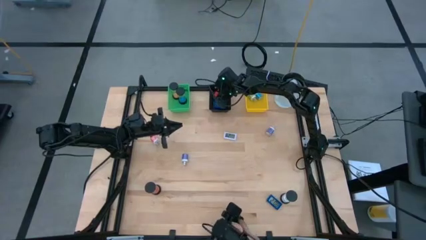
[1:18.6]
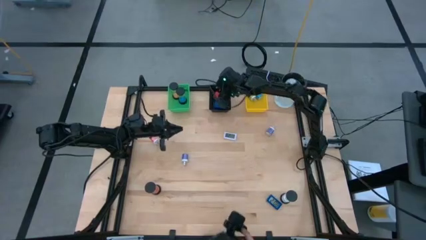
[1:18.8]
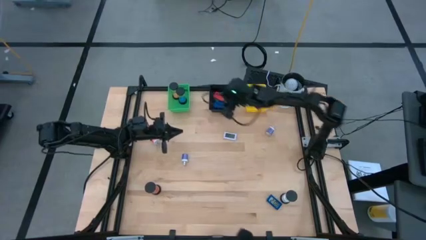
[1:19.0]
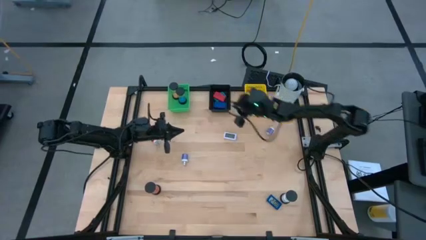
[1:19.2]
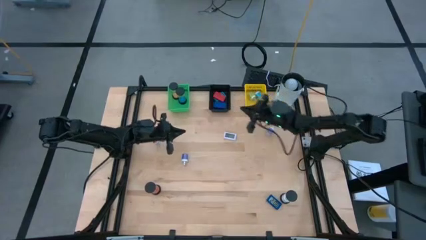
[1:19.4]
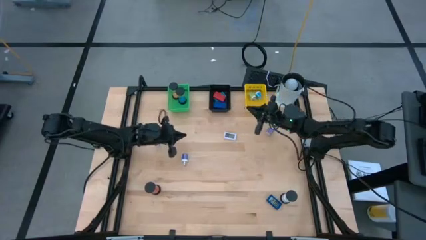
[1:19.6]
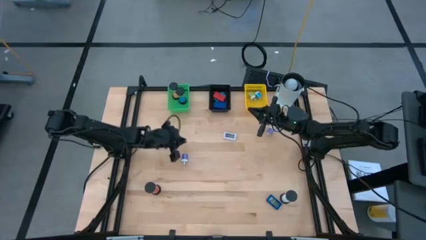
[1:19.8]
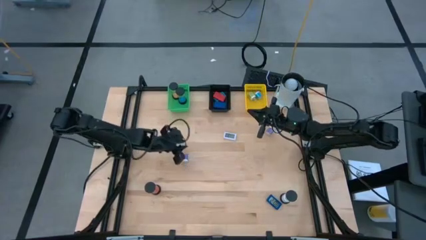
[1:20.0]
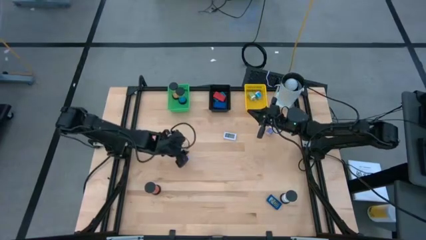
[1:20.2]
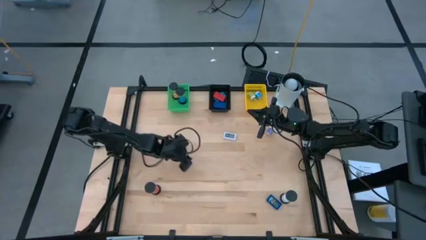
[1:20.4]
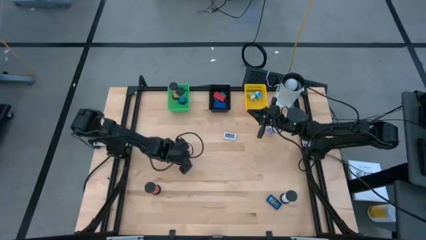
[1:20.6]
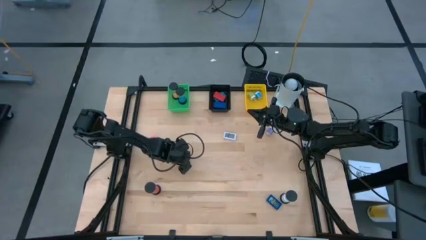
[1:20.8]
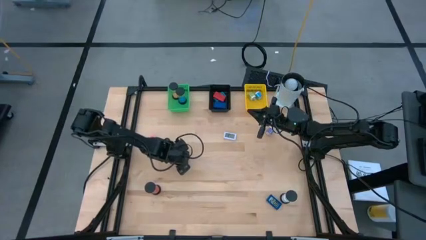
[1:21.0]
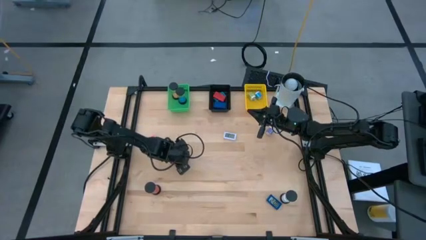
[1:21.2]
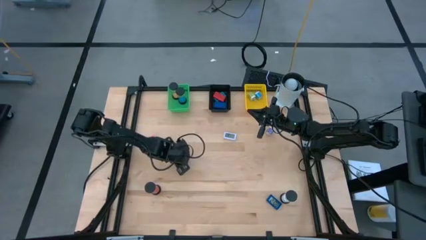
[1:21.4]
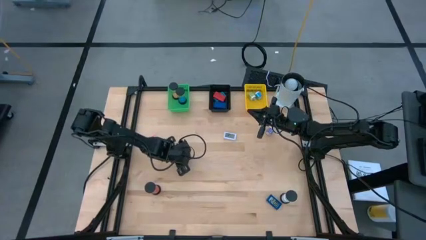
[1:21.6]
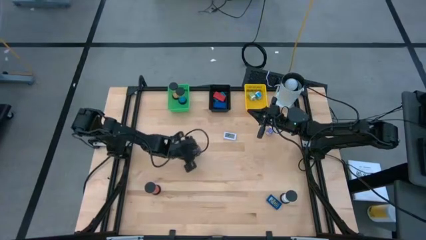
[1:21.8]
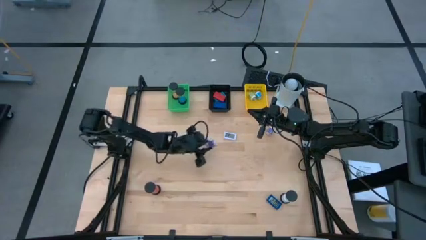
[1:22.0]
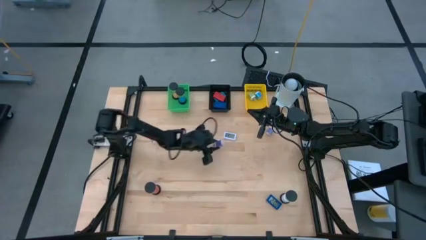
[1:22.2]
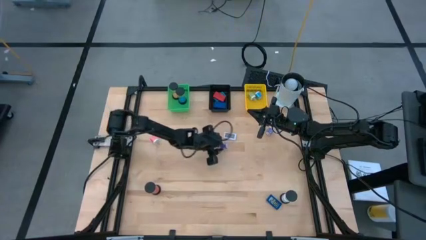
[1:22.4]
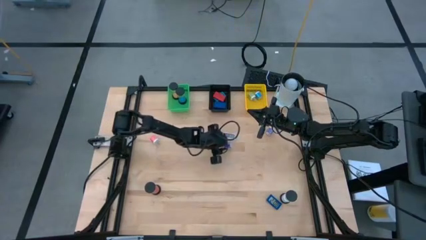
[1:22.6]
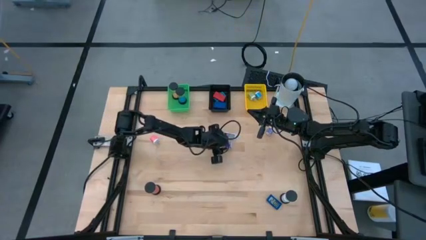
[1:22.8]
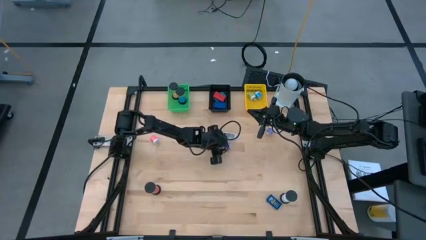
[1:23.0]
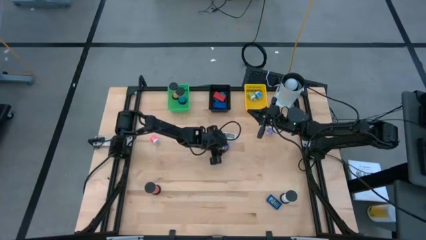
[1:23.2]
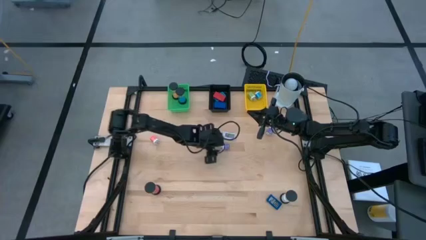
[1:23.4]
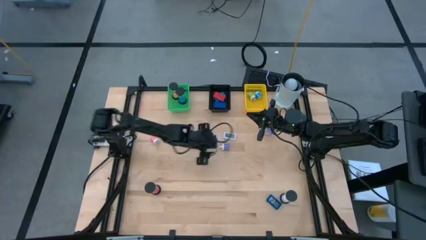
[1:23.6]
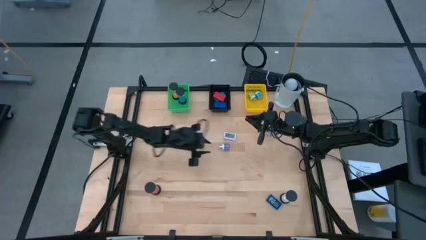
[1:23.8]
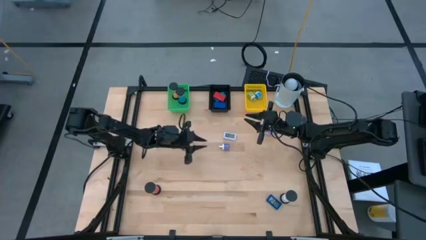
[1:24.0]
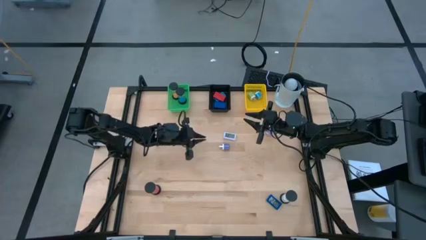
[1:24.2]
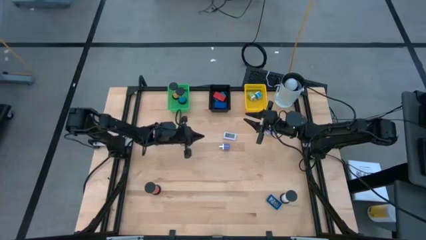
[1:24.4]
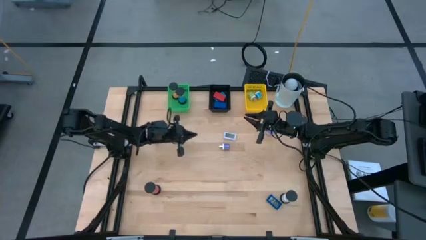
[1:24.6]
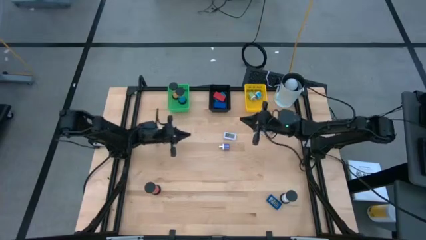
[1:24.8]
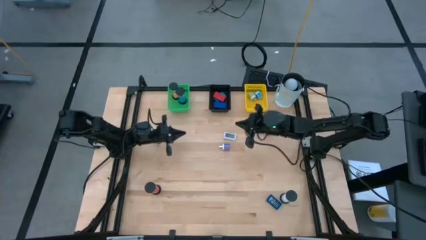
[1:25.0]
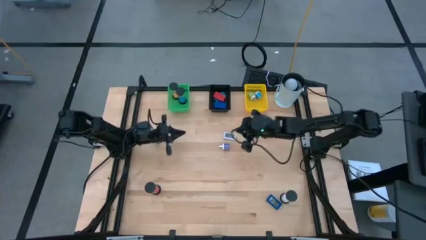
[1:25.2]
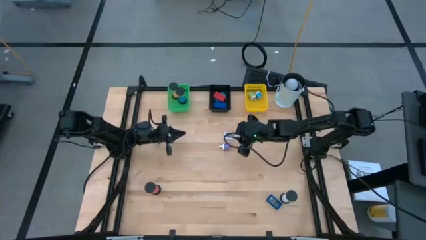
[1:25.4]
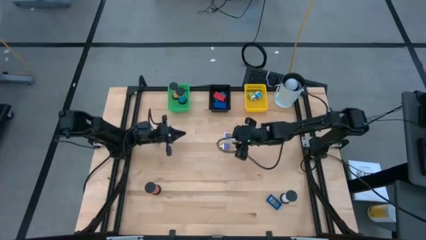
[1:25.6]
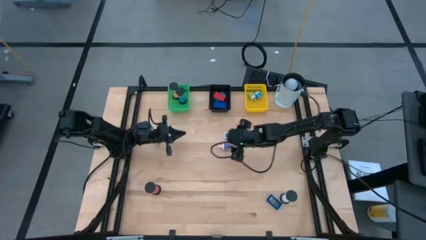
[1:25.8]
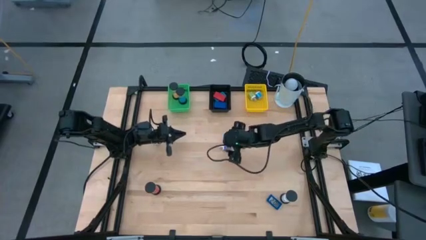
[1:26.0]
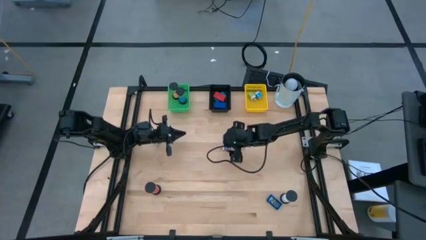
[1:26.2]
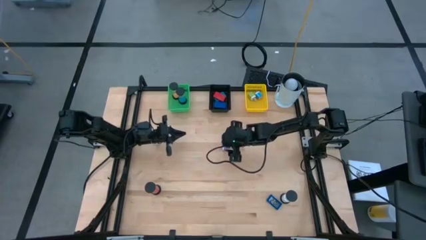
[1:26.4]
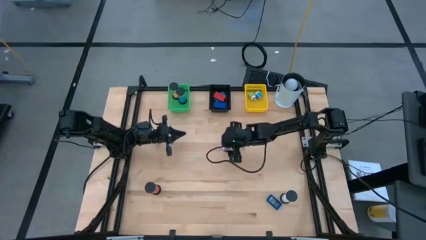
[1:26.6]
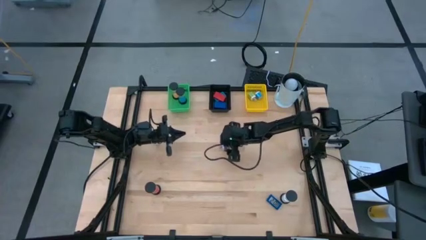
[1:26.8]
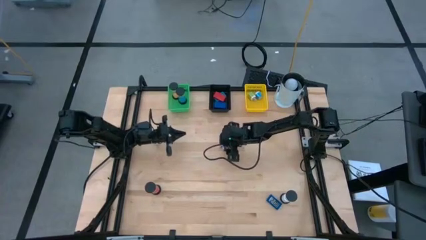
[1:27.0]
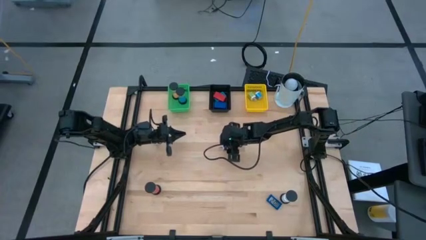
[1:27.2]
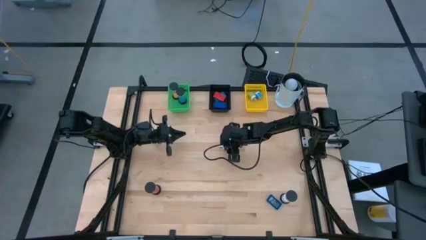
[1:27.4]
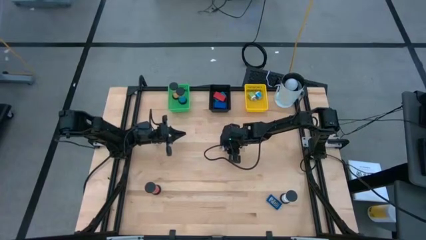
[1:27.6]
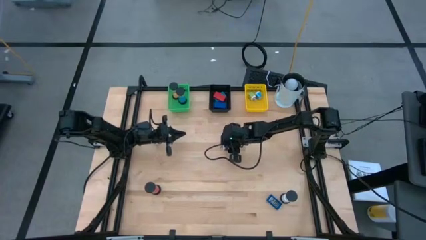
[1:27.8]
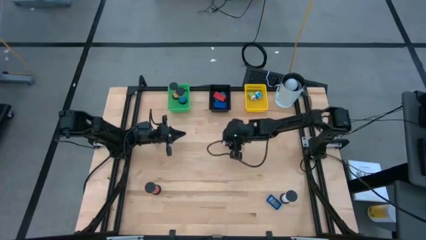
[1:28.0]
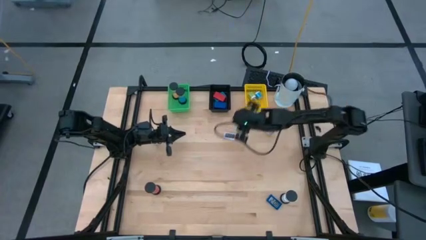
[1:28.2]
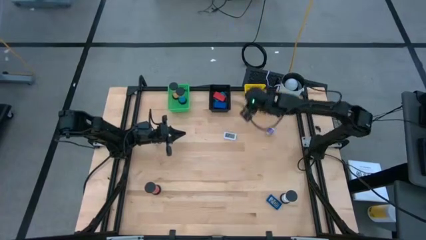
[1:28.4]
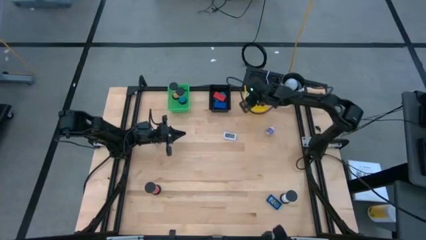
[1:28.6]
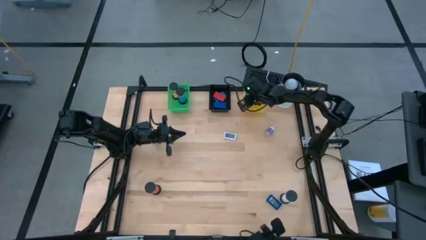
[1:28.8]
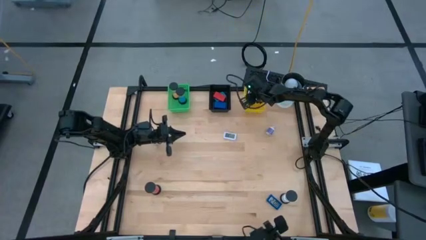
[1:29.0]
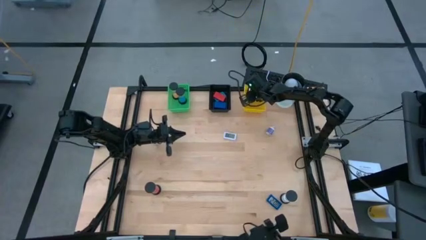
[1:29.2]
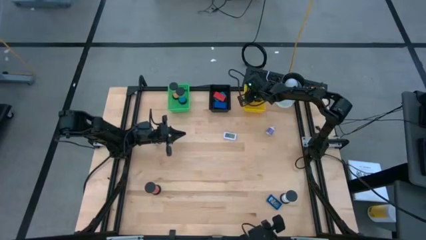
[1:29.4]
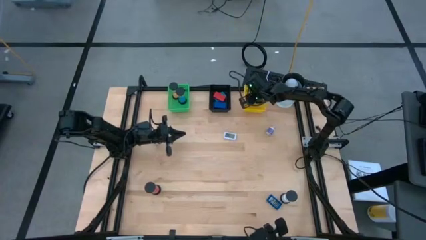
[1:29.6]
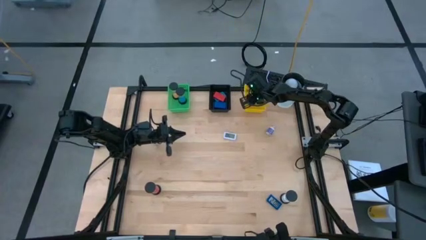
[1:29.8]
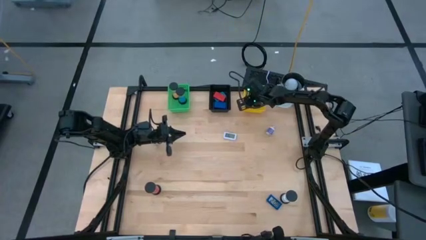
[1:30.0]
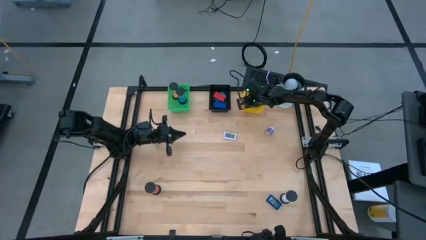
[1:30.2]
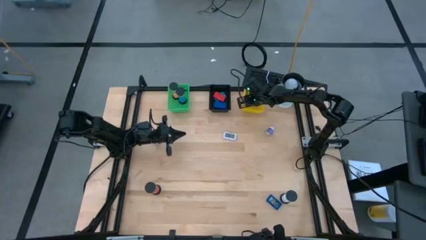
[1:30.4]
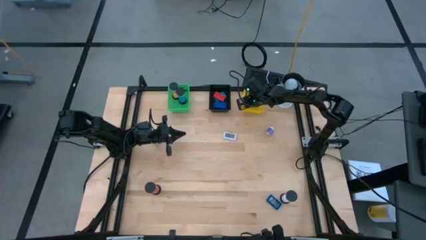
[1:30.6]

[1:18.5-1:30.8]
Task: Pick & Place Office items
Put the left purple charger adapter into the yellow bin

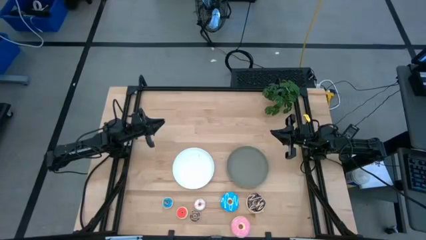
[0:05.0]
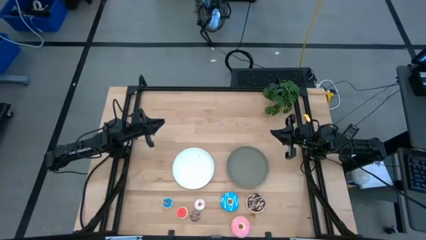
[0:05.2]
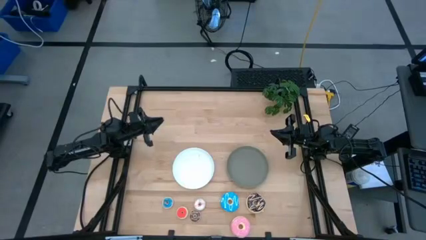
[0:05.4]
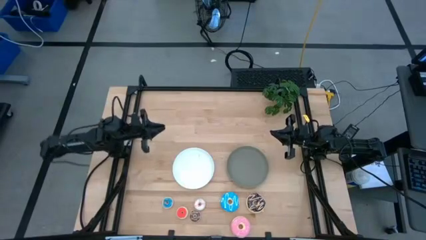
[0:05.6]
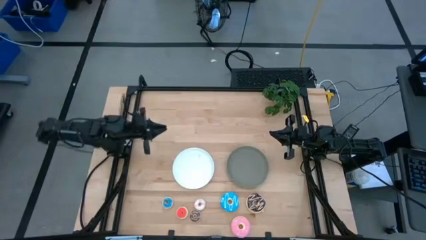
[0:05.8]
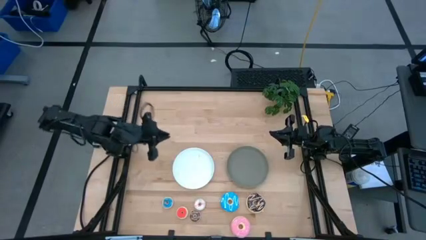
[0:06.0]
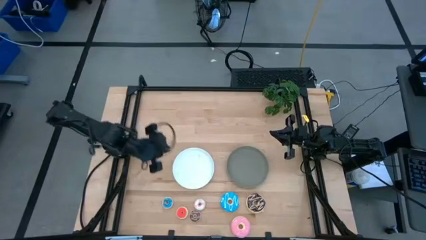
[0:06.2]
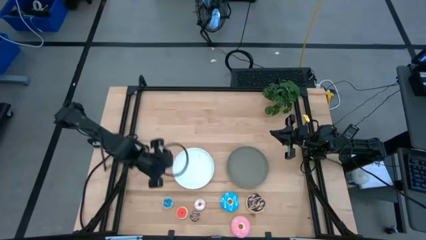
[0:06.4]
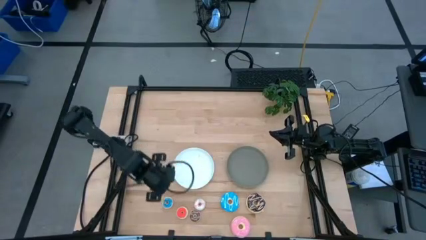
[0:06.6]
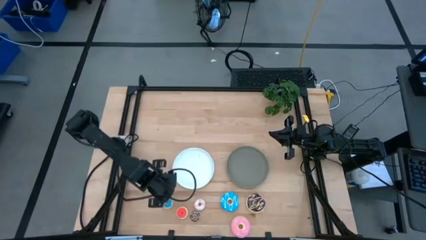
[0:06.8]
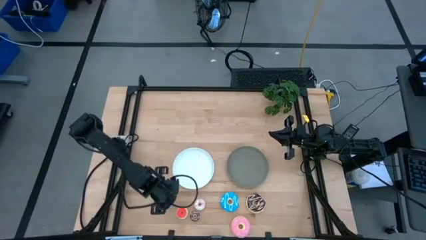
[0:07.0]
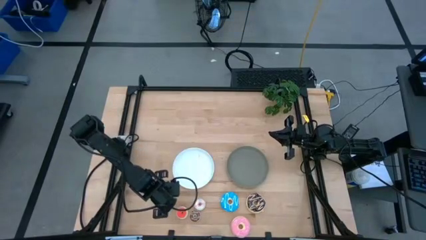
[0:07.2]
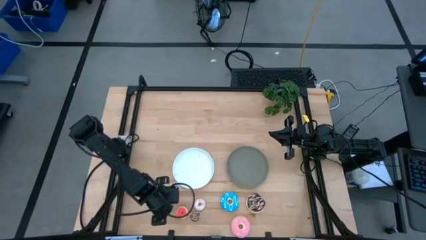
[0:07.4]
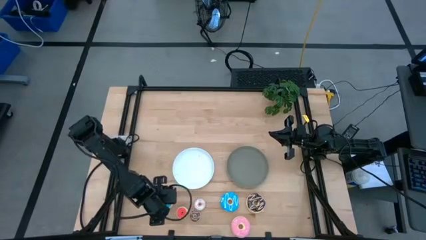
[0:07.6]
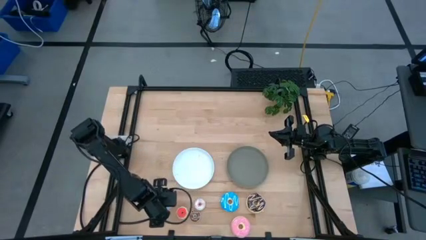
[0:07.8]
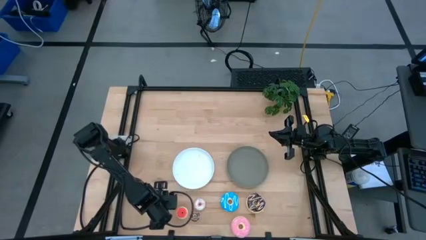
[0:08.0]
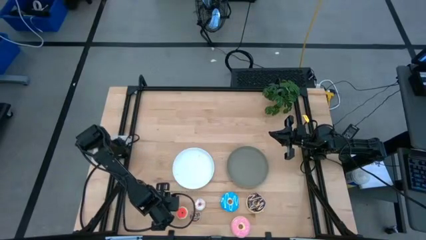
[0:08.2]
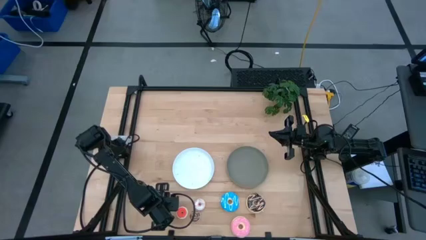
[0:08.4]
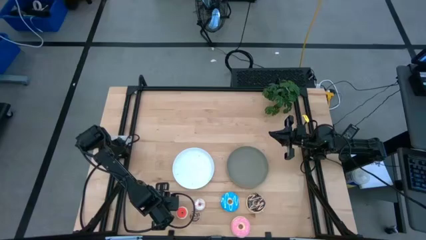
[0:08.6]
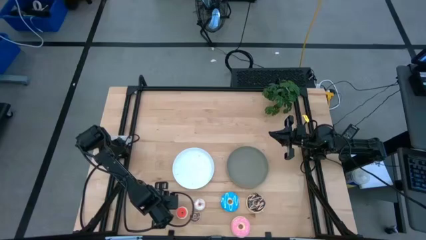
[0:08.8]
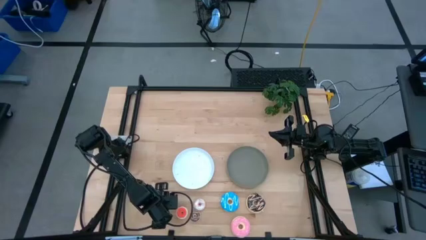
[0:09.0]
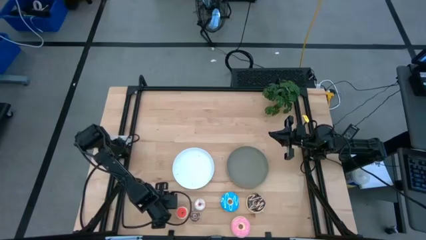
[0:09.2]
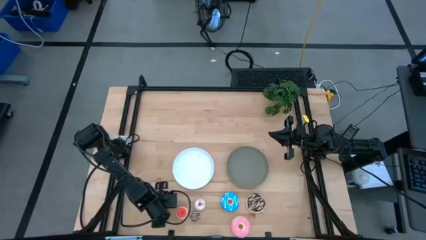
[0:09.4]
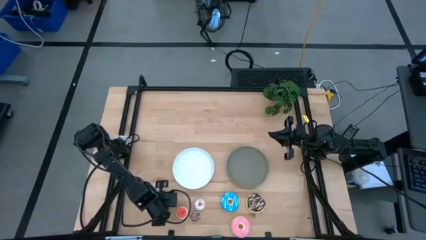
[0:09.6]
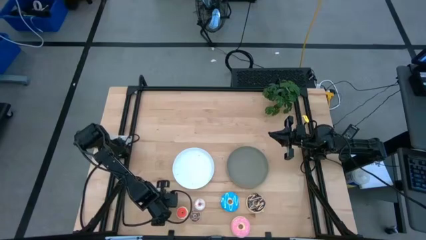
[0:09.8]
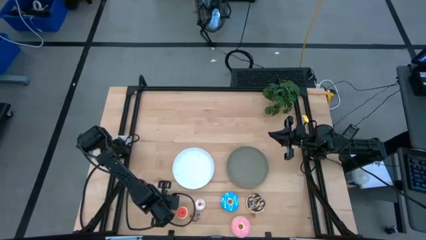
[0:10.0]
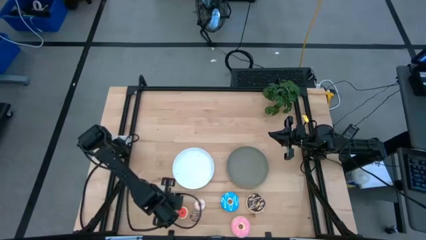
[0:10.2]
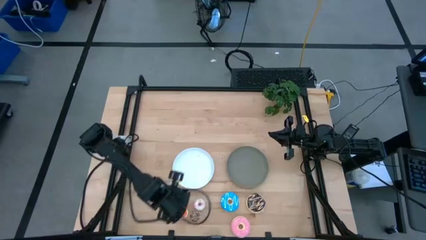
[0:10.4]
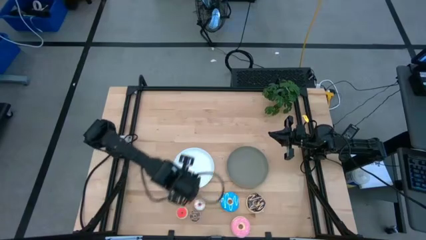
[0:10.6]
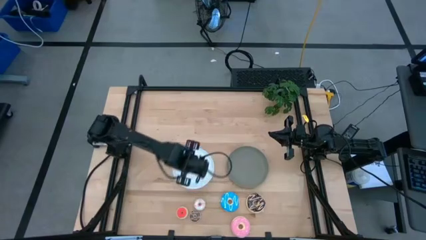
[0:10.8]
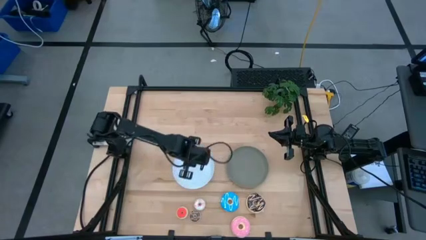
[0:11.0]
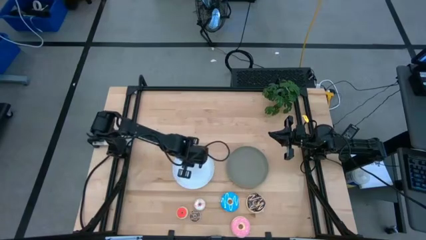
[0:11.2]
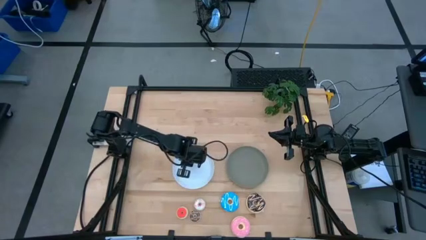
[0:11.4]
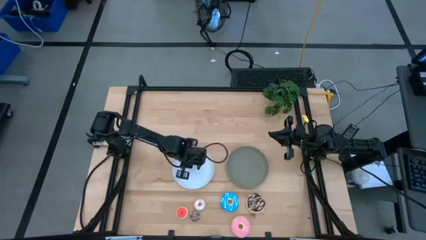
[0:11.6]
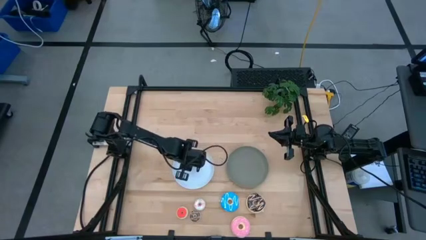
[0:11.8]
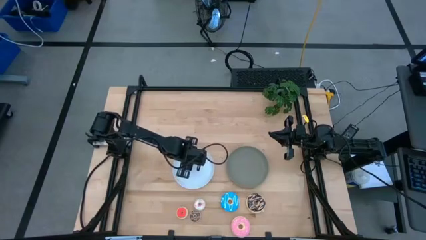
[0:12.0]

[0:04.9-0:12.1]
Task: Pick & Place donuts
Put the small blue doughnut on the white plate
